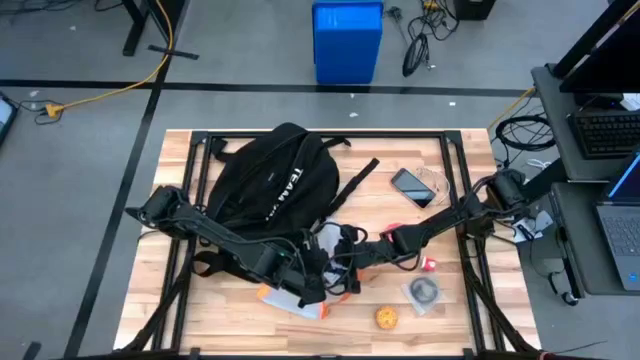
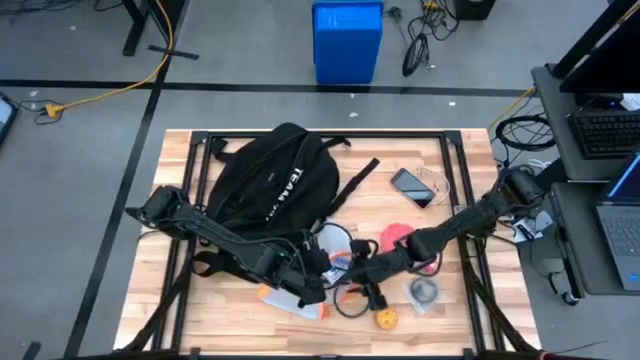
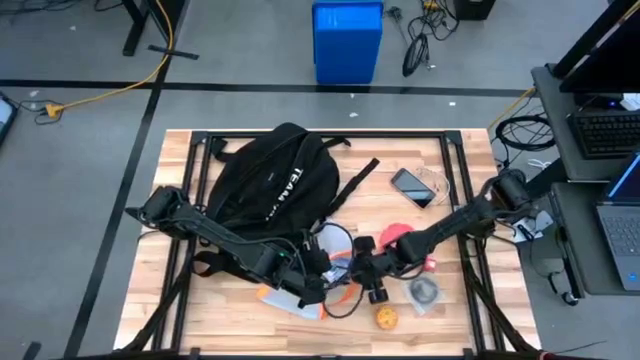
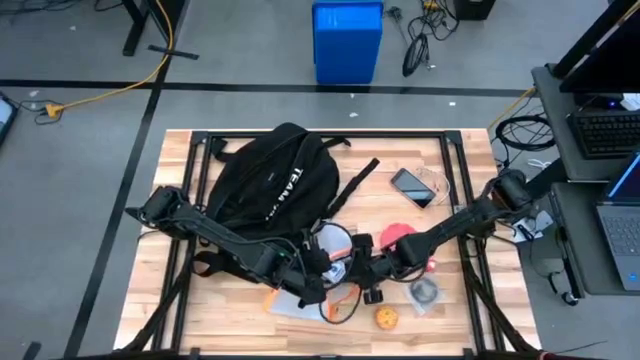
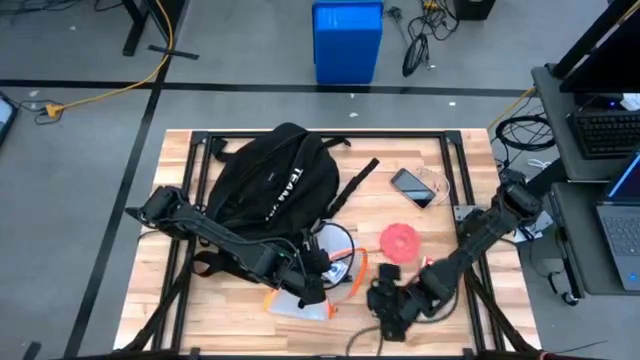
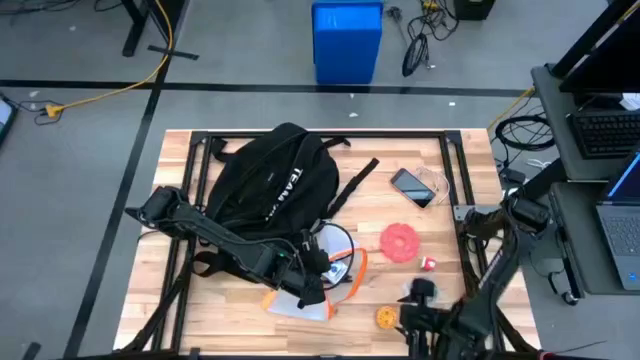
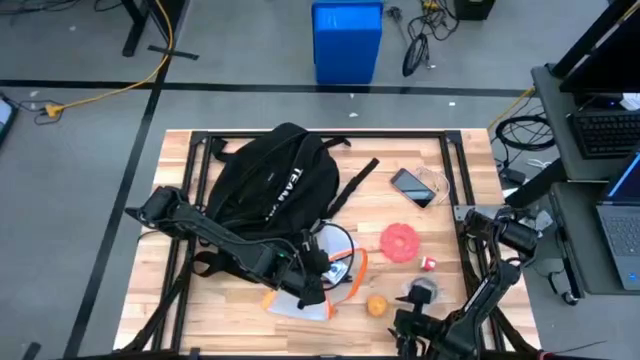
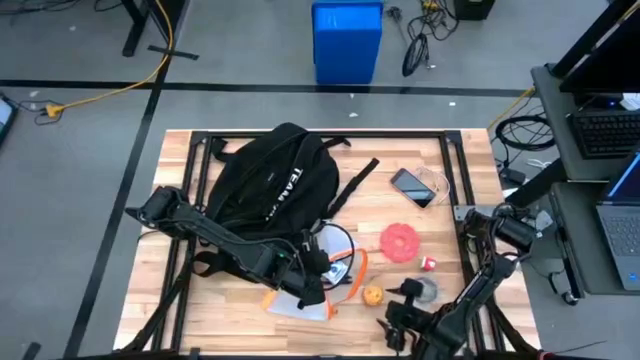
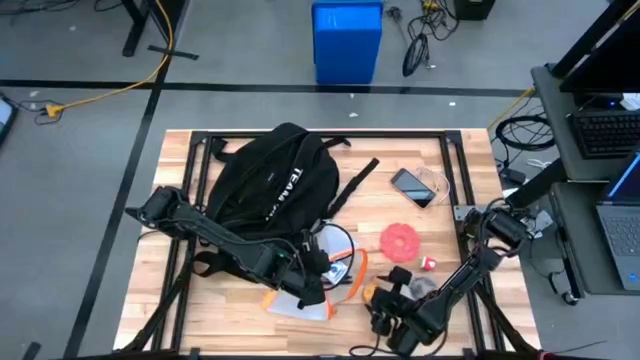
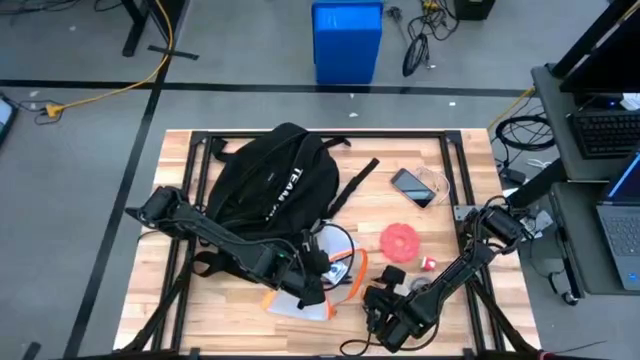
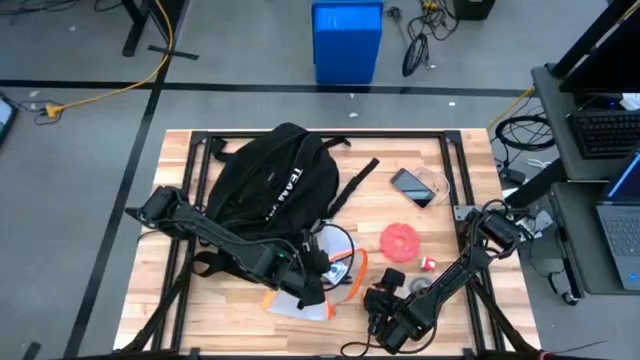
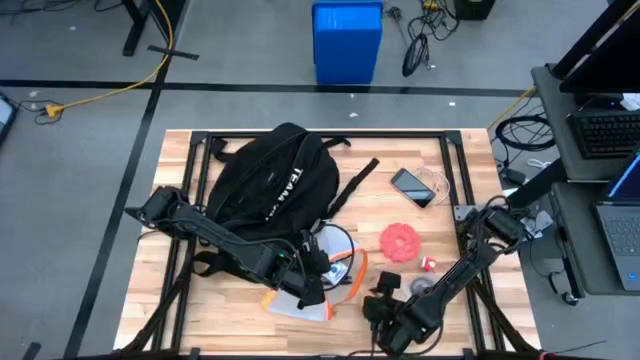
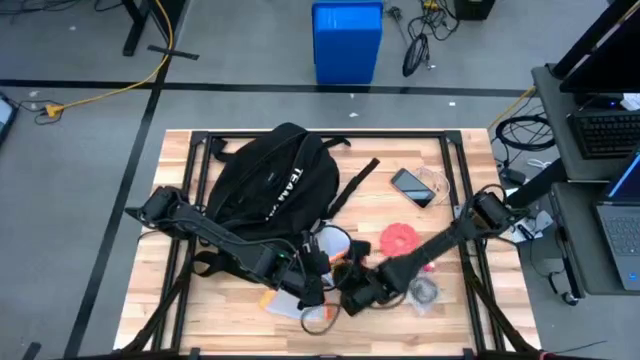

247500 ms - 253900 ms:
Task: Unpack backpack
Put the scented candle into the orange zip bag

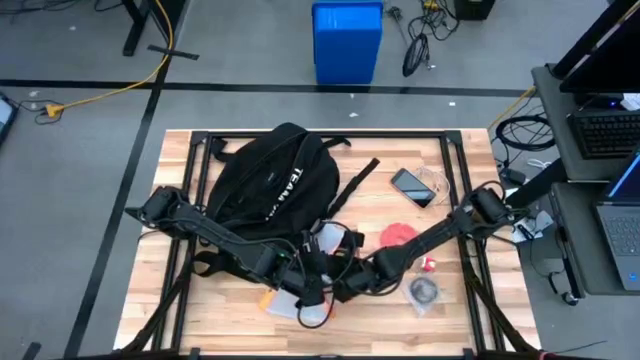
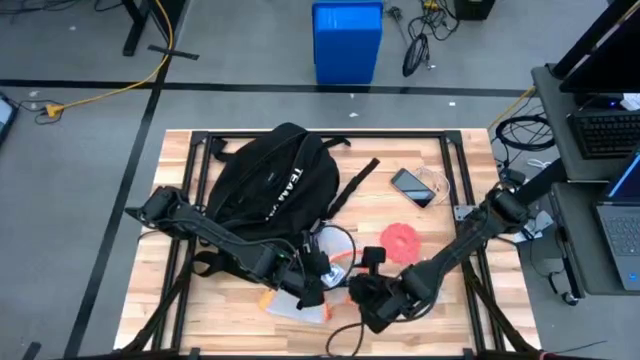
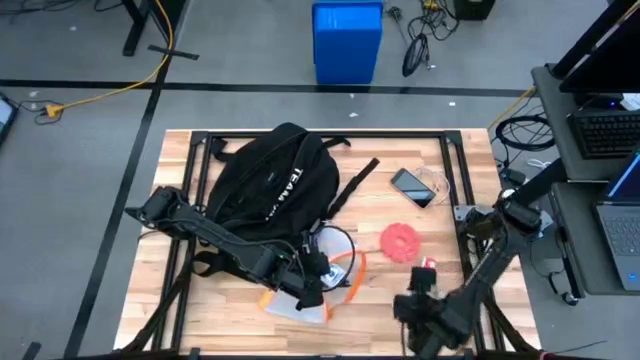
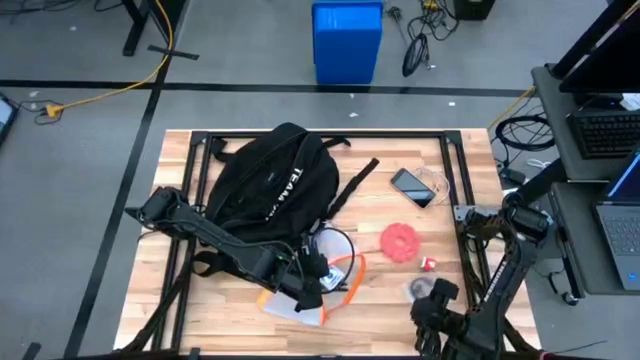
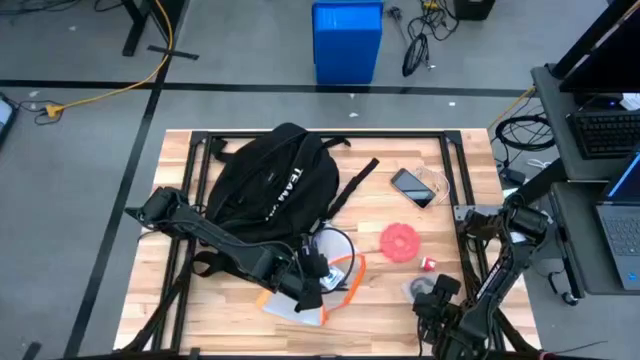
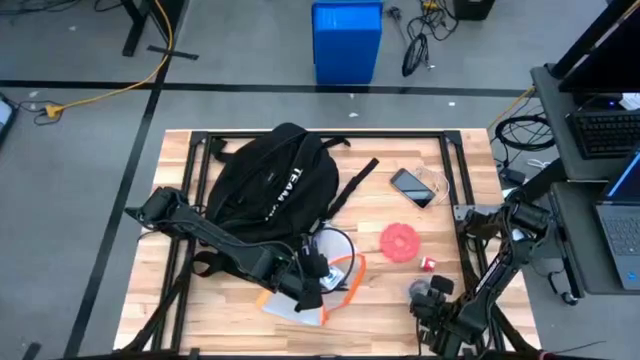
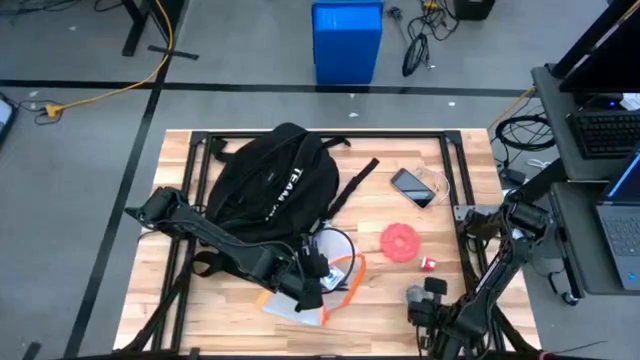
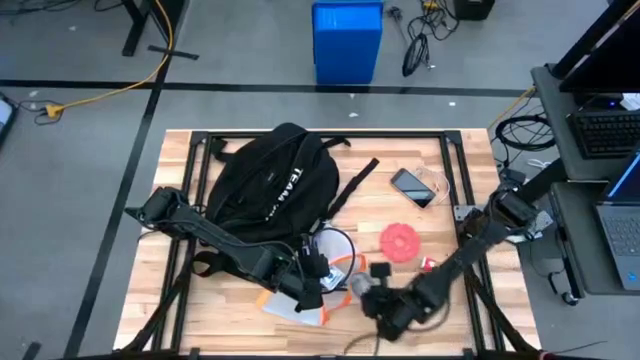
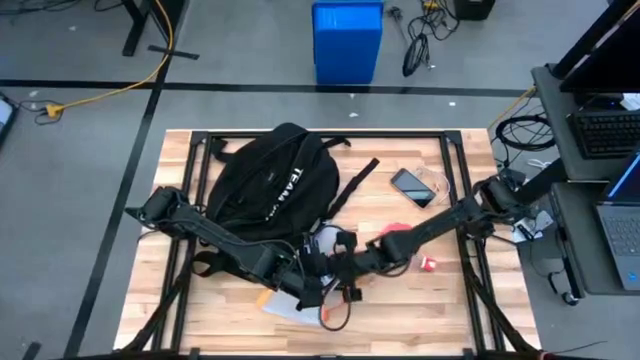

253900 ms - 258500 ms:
Put the earphones into the orange zip bag

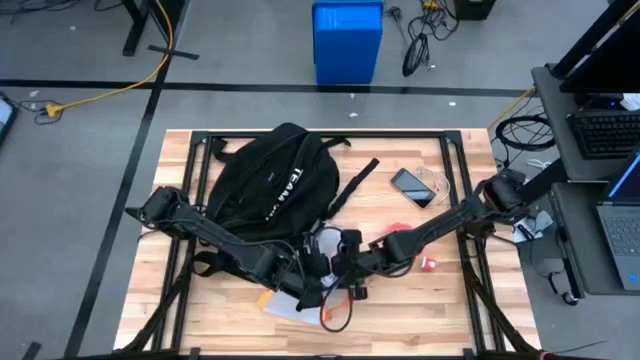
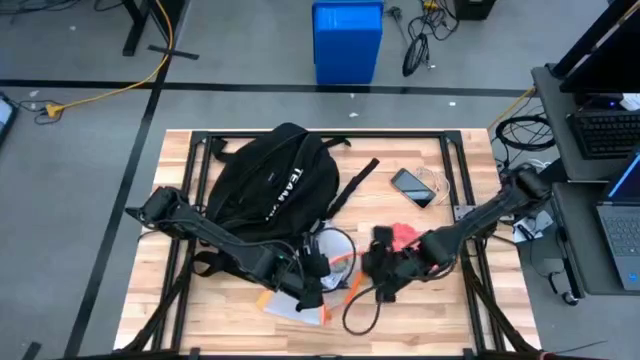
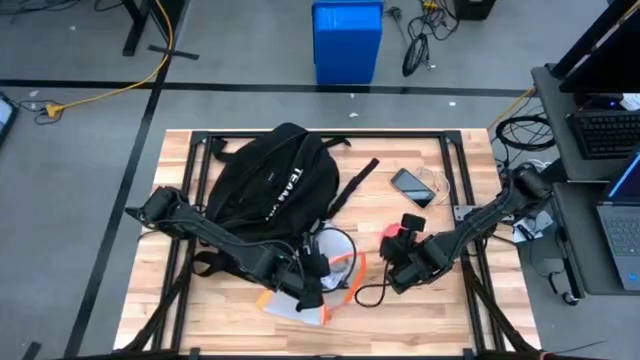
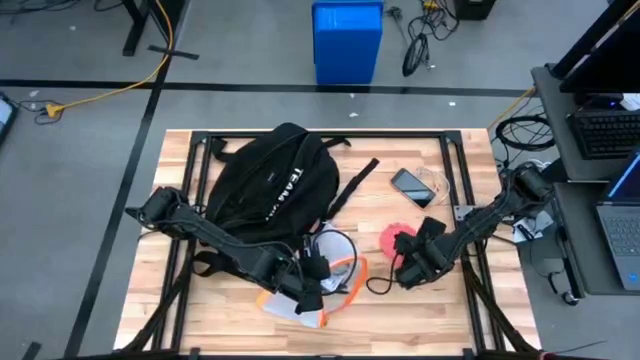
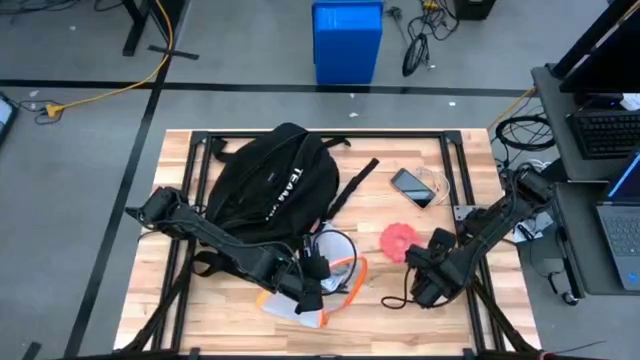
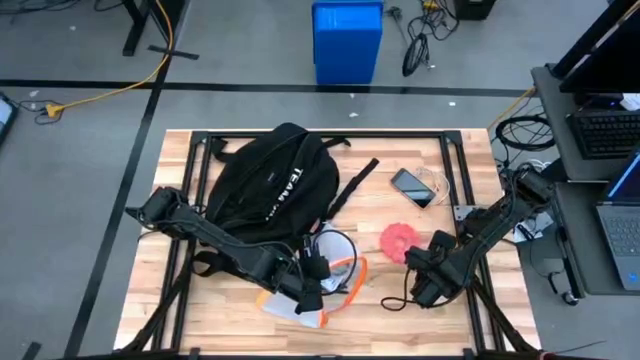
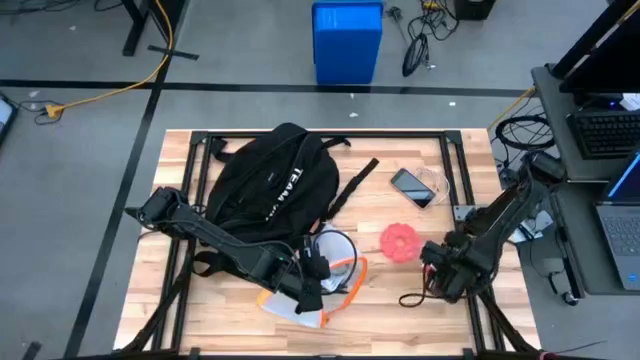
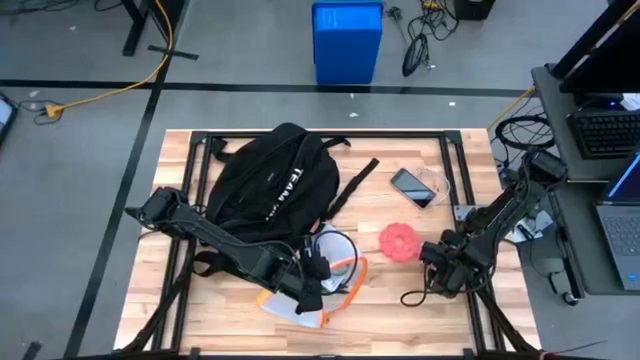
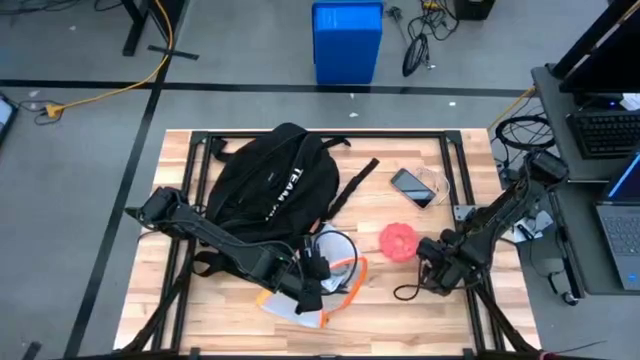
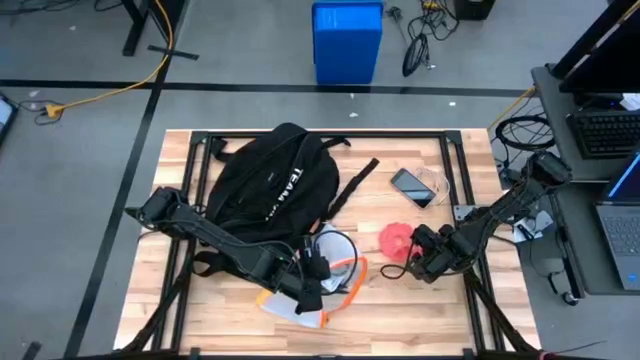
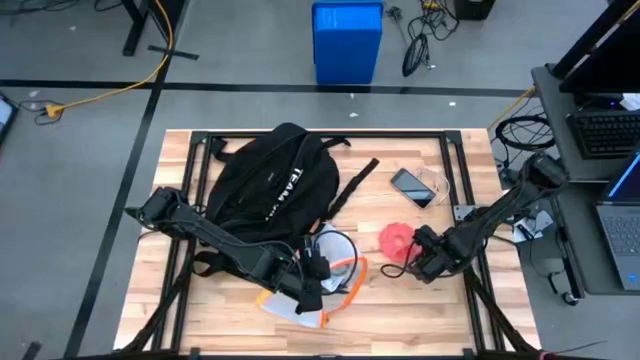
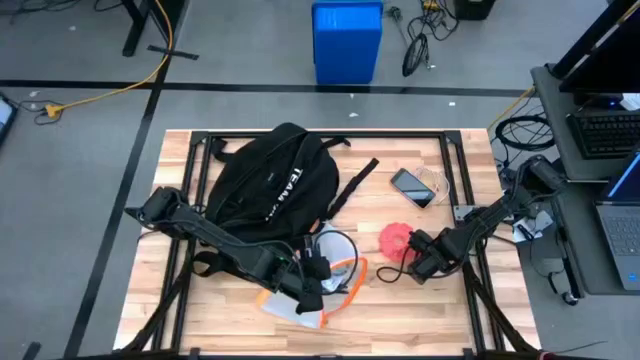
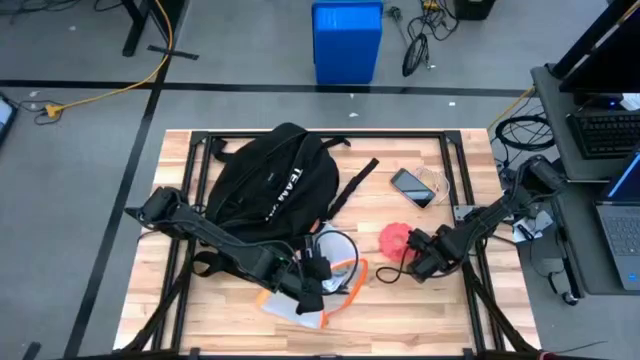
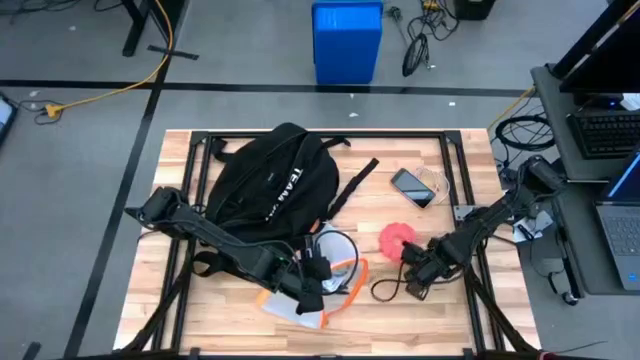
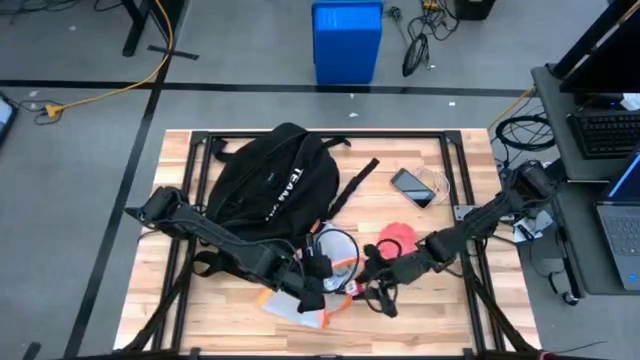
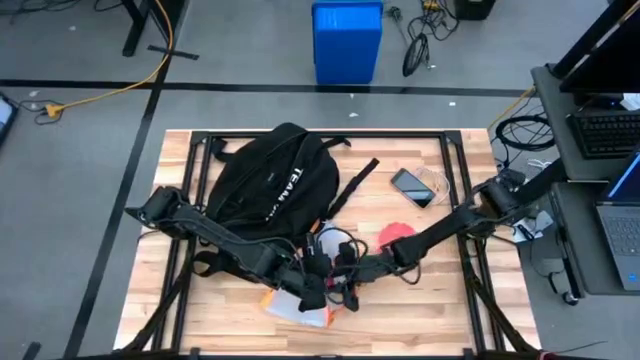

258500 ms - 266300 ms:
Put the charger adapter into the orange zip bag

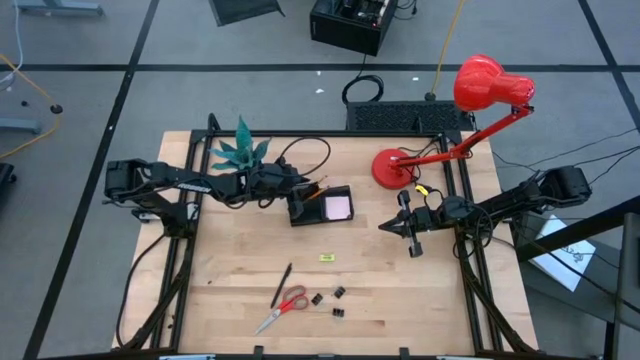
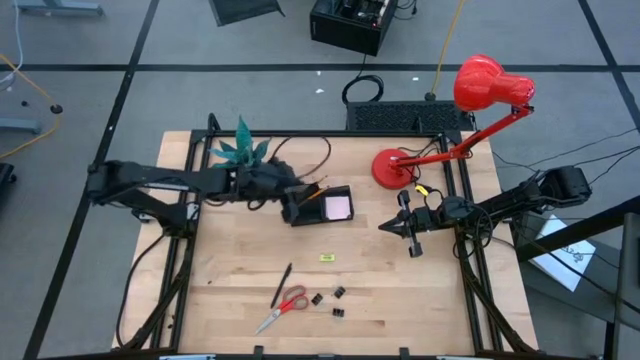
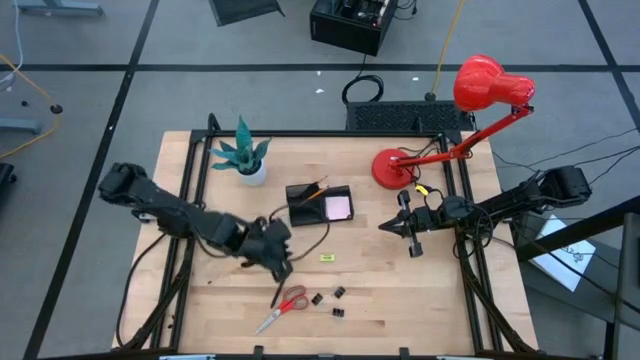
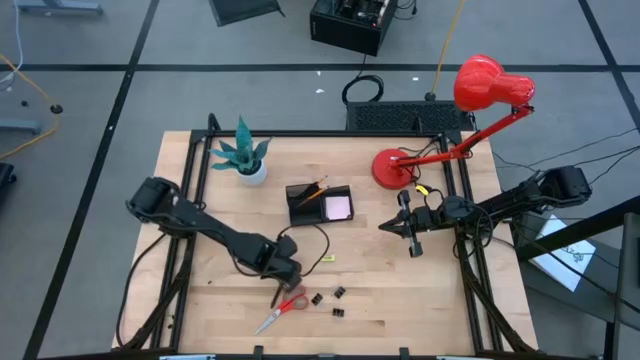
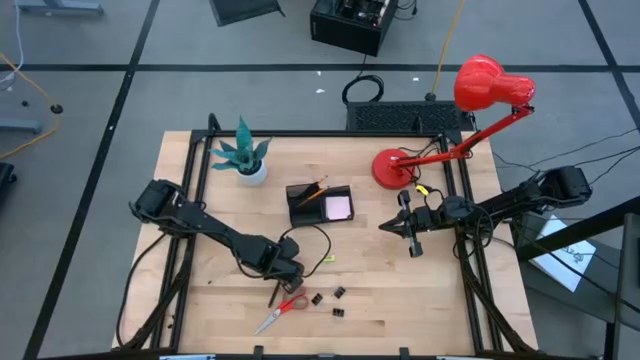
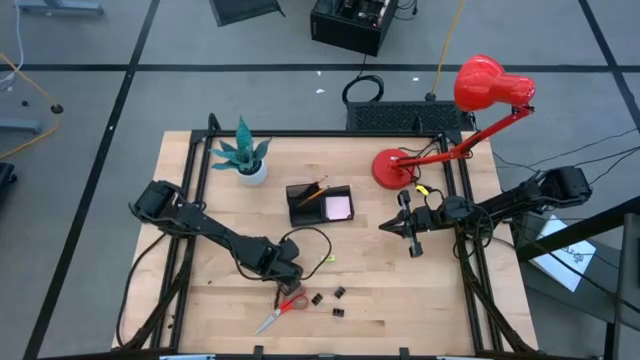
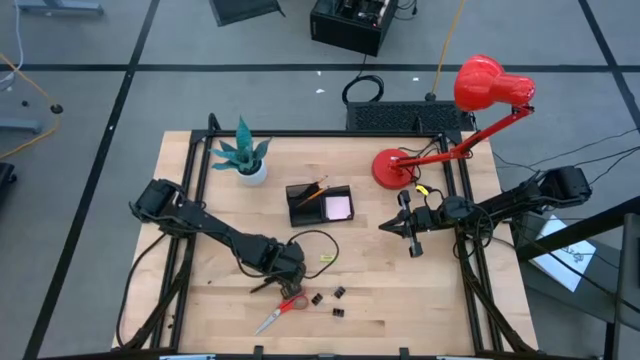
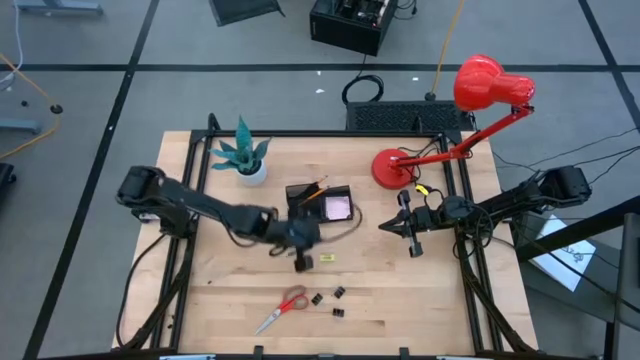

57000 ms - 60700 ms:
Task: Pick and place office supplies into organizer
Put the black pen into the black desk organizer
